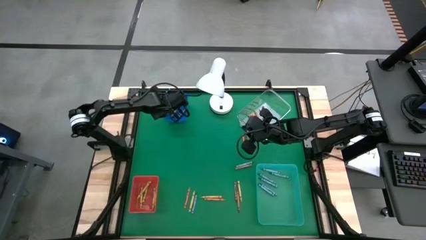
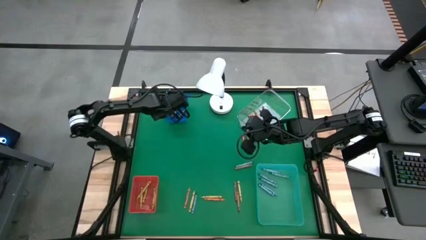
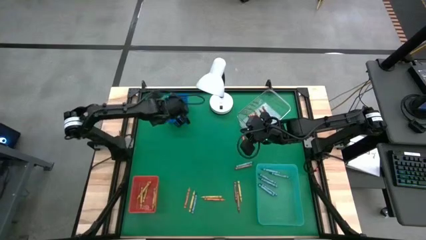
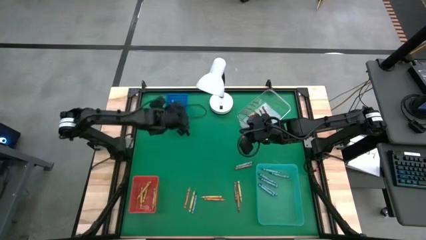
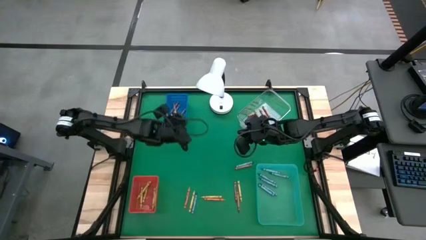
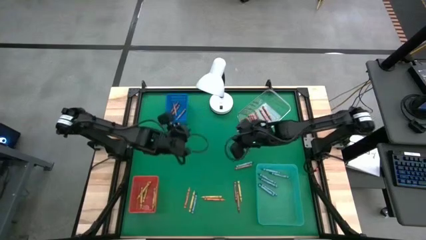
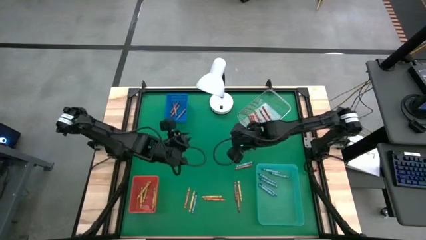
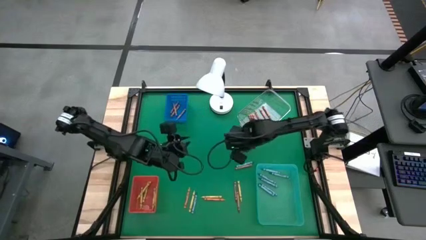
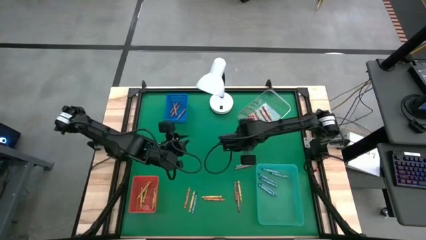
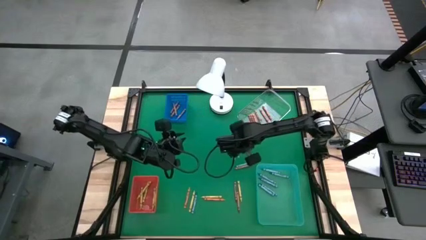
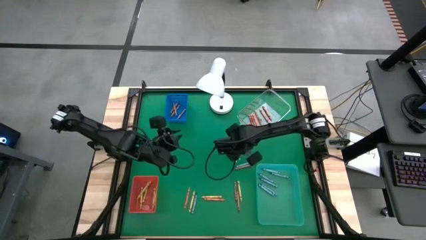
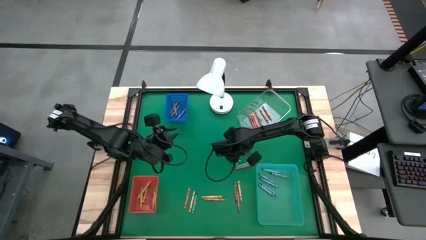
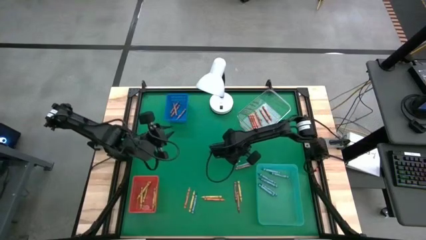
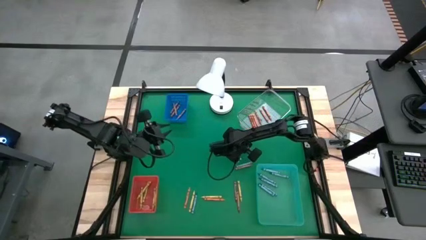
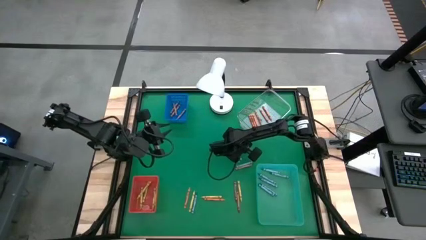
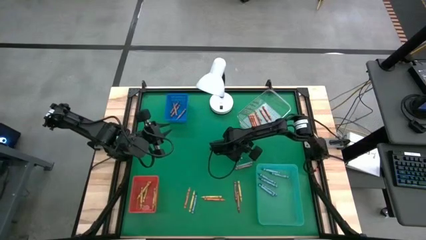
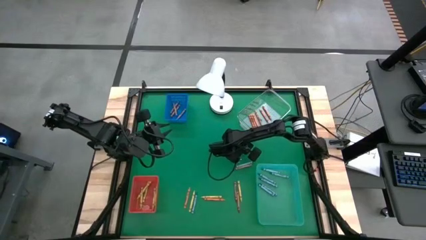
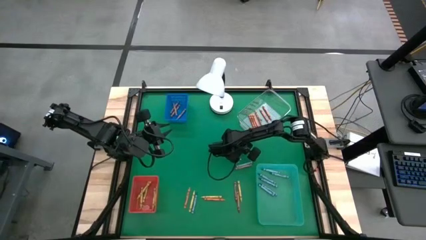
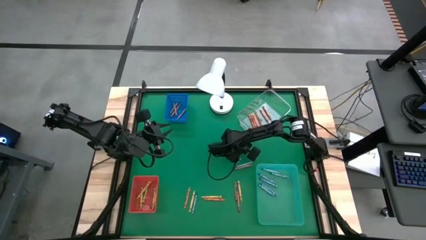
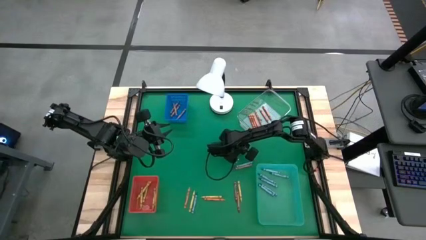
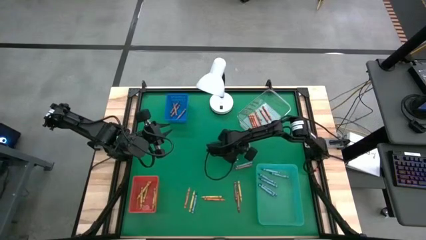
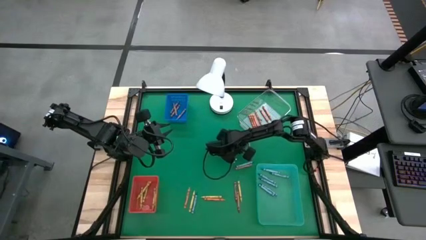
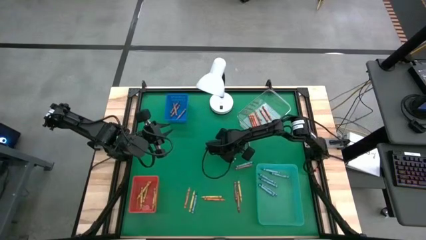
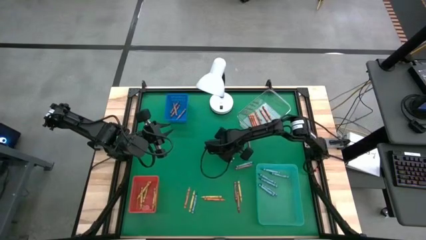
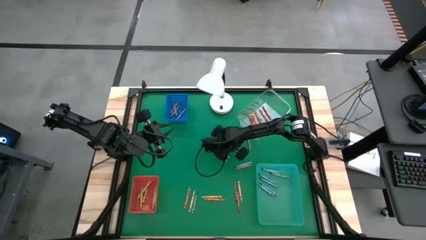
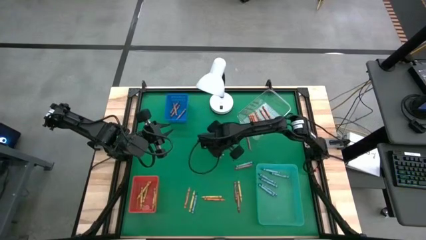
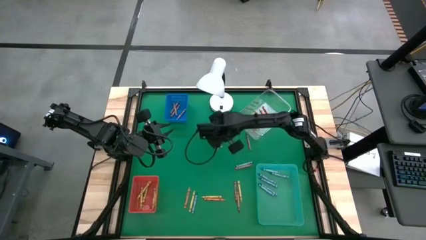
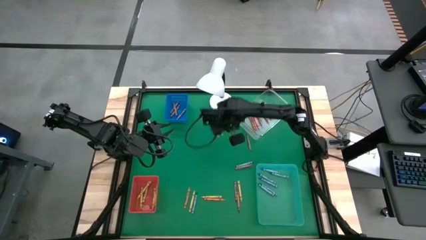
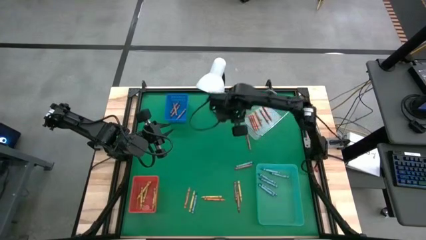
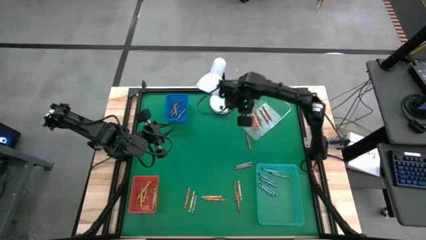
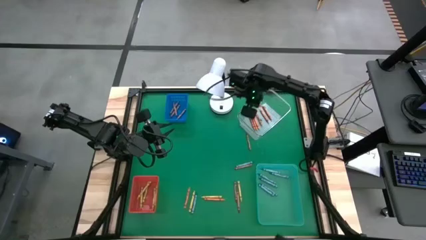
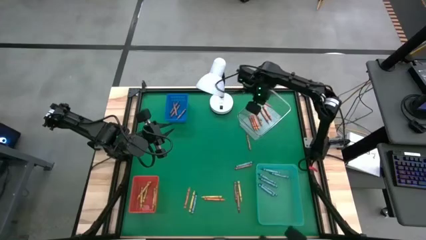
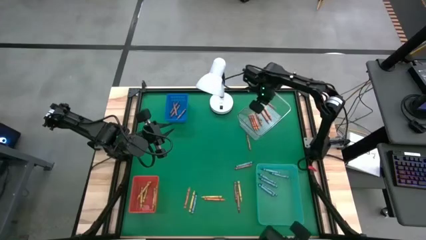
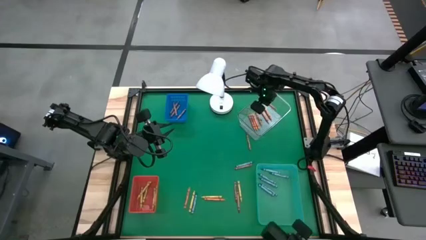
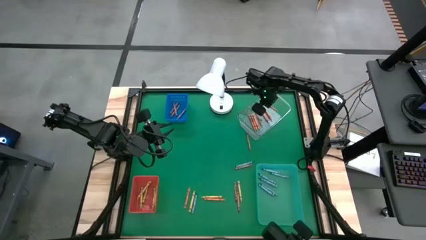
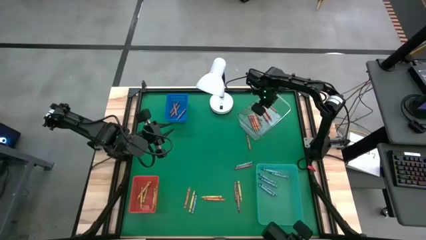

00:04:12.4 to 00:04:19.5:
Task: Sort crayons
Put the orange crayon into the transparent bin

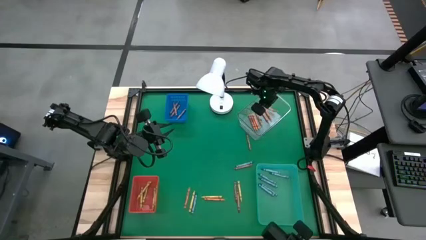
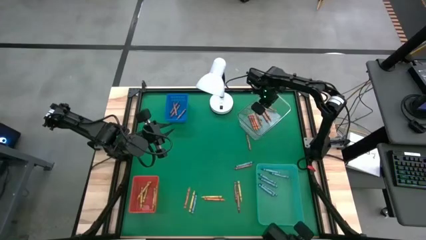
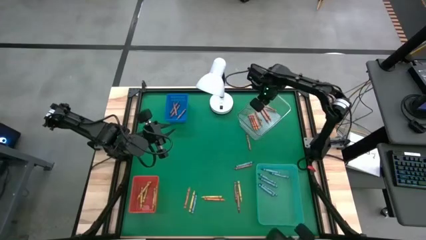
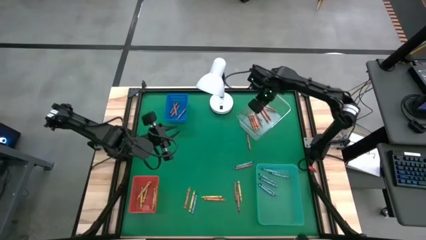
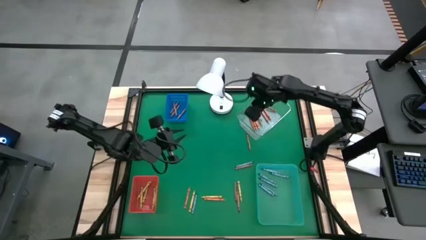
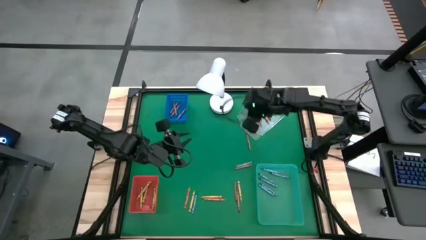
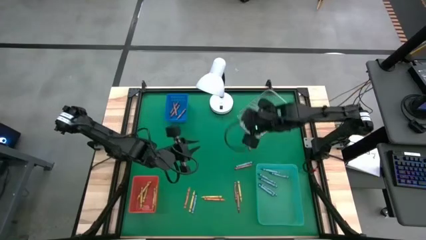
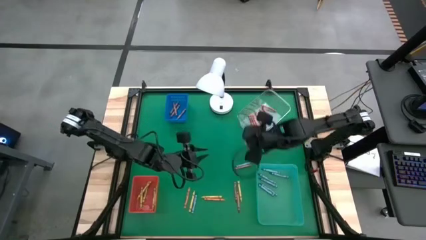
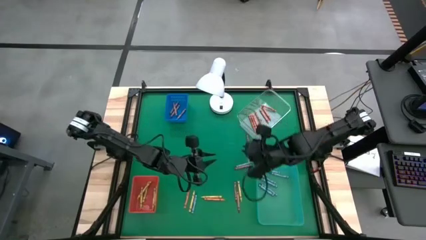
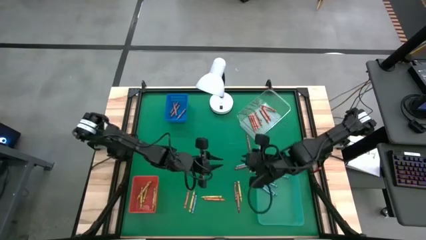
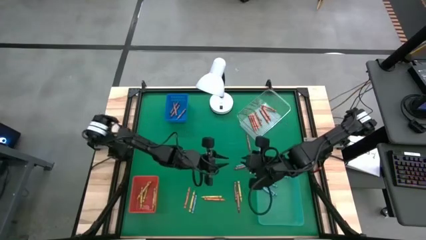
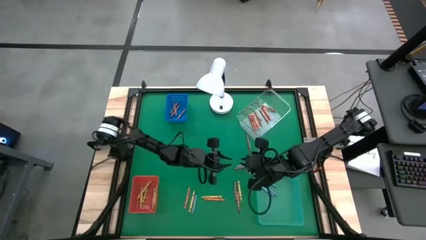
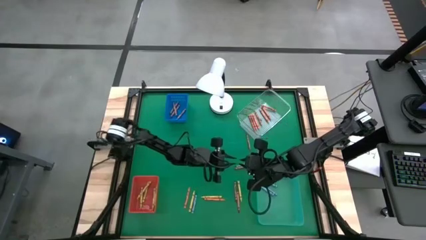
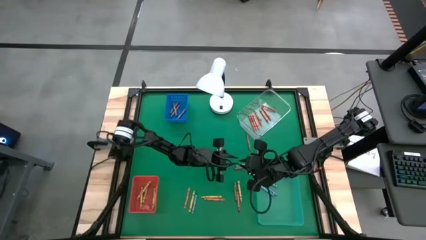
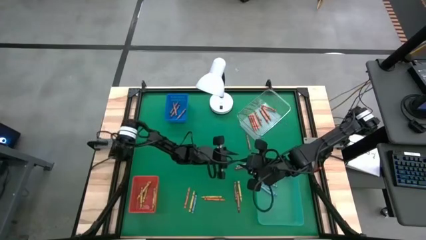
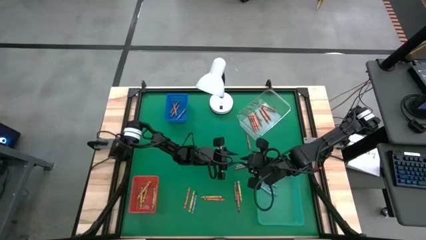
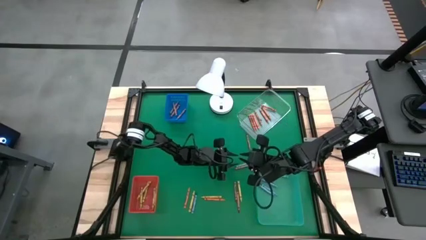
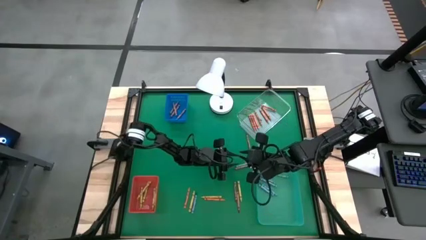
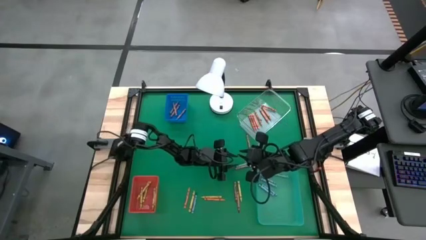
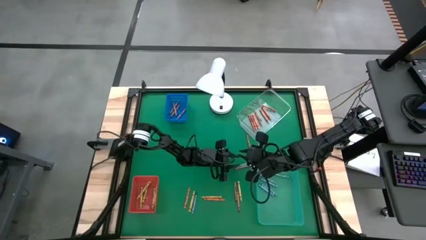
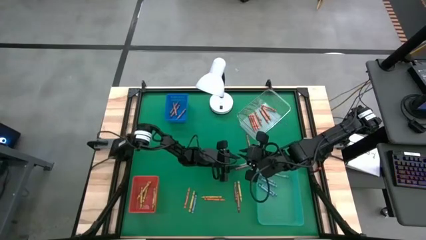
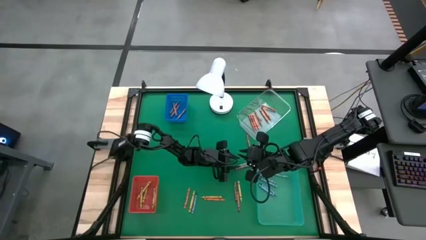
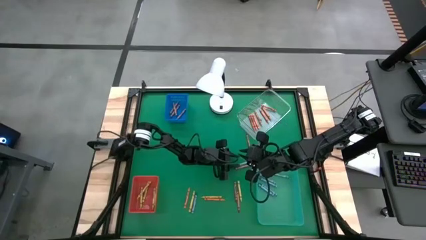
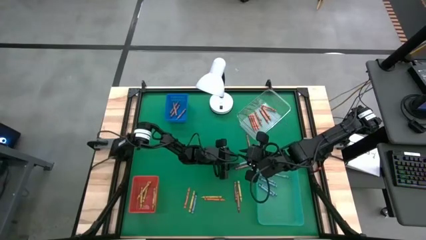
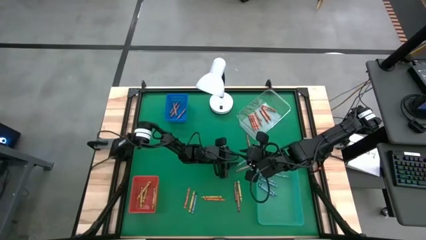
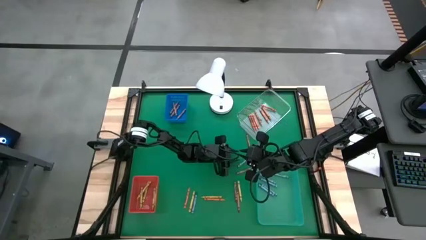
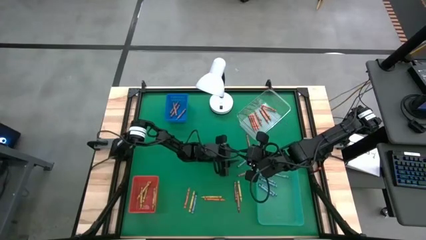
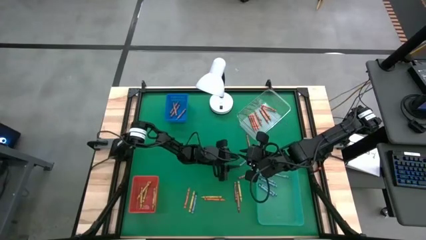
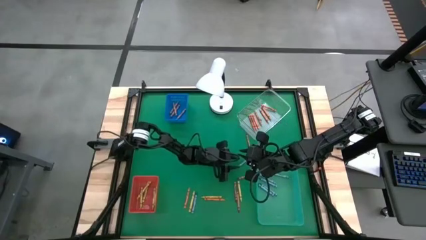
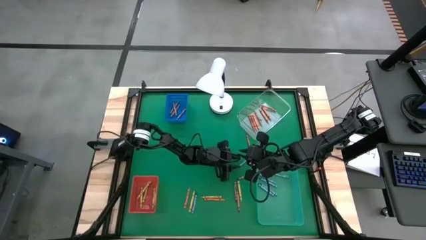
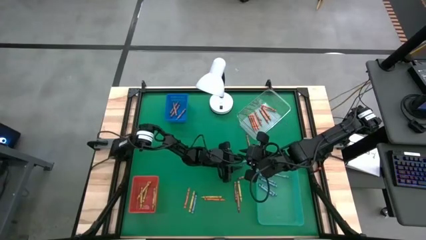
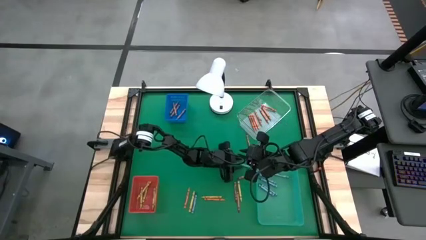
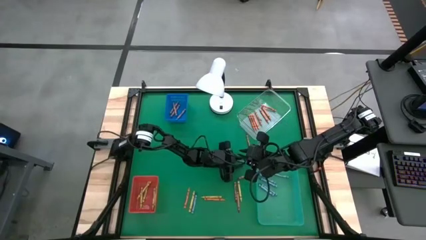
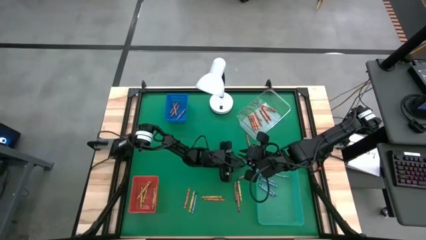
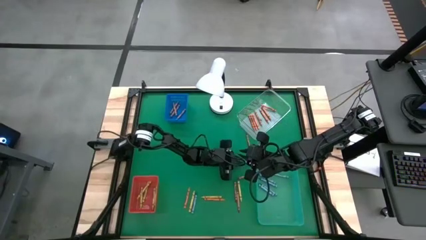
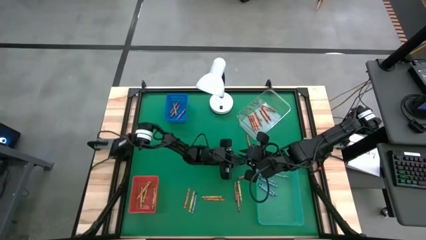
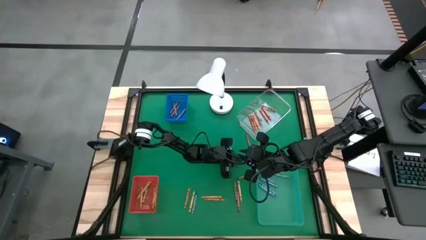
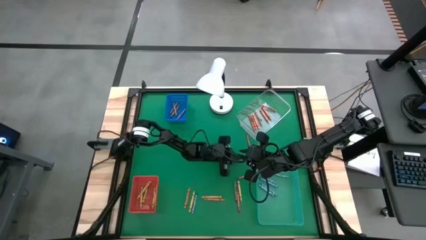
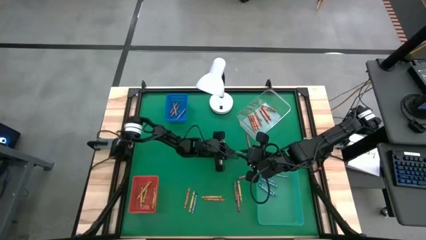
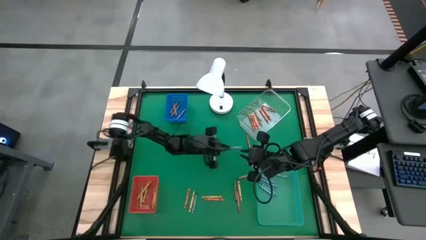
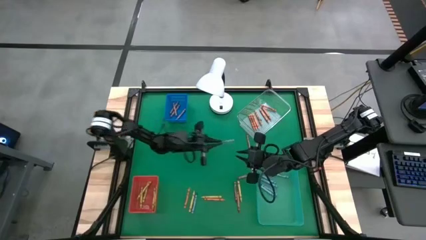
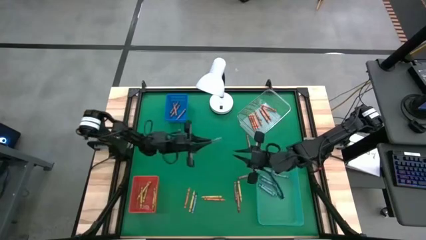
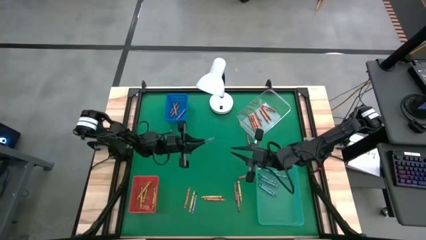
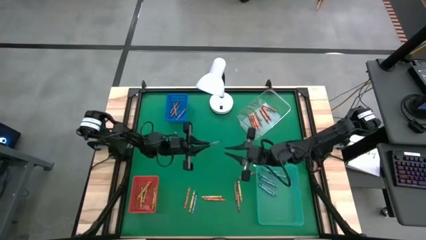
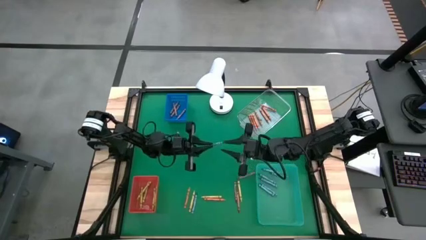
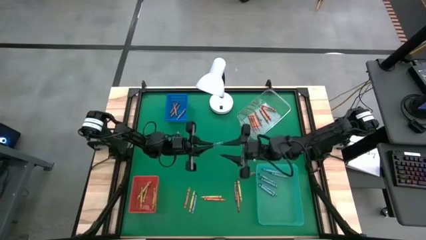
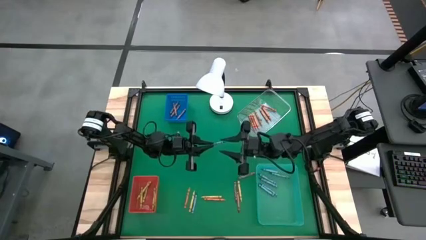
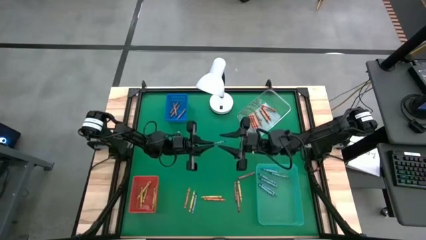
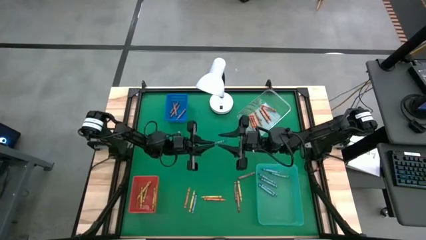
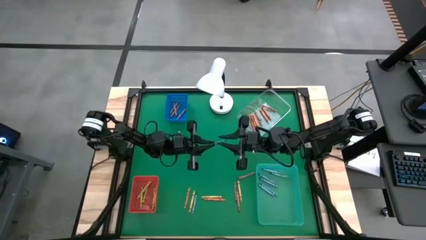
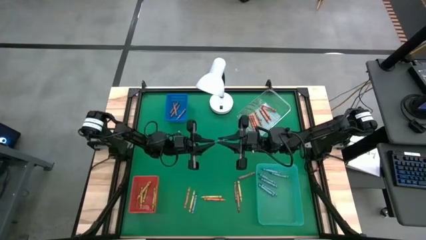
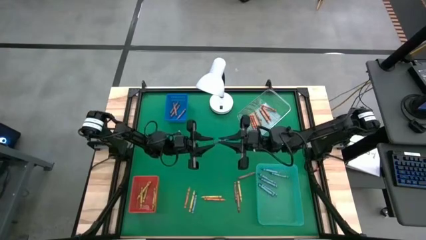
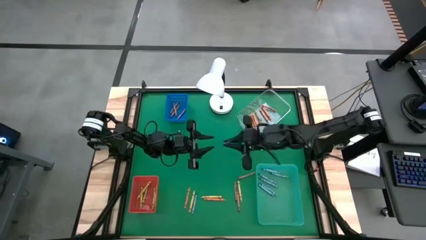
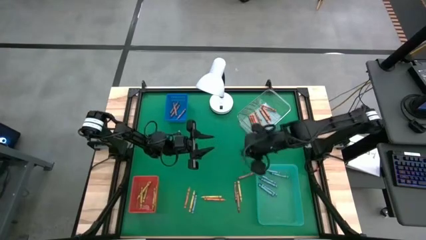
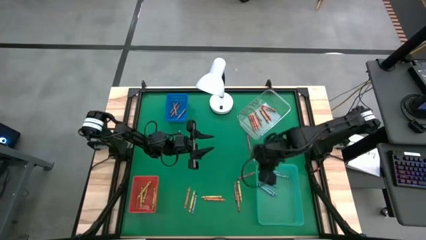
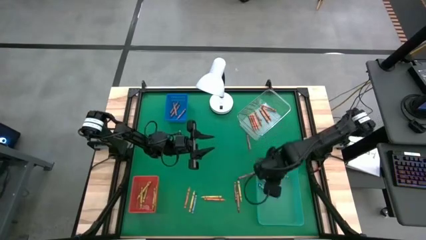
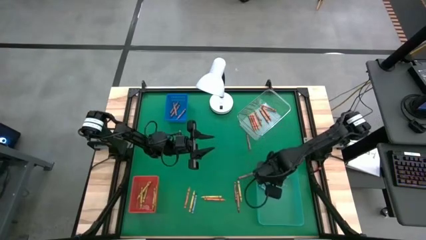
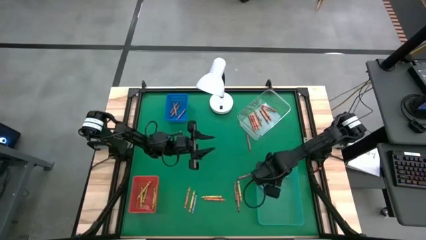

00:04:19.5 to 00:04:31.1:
Put the blue crayon into the green bin
